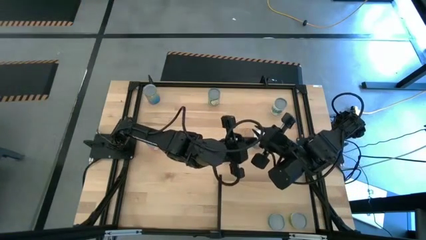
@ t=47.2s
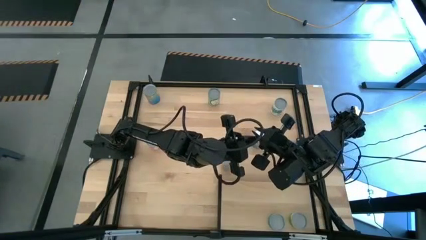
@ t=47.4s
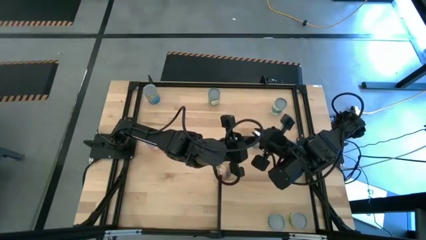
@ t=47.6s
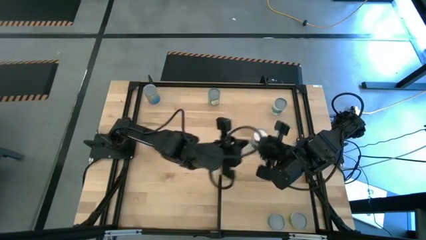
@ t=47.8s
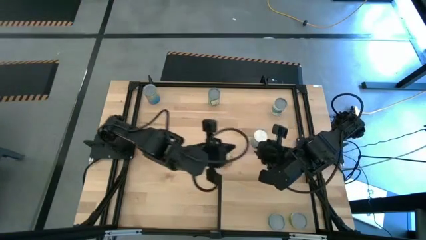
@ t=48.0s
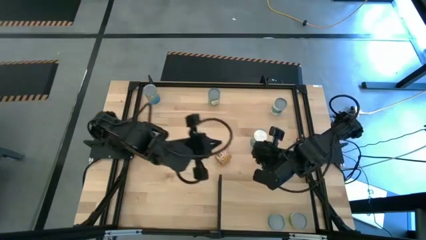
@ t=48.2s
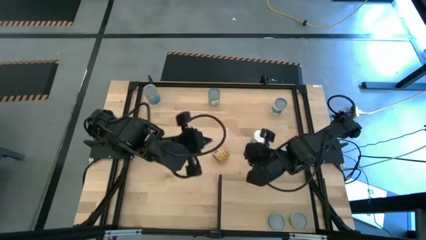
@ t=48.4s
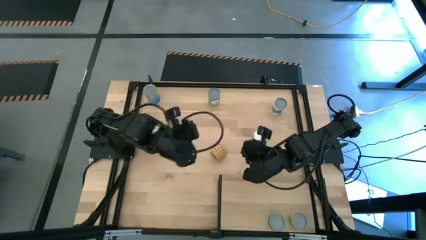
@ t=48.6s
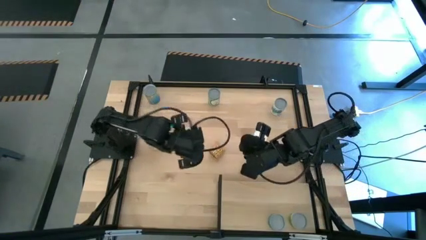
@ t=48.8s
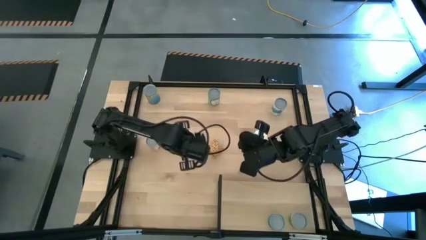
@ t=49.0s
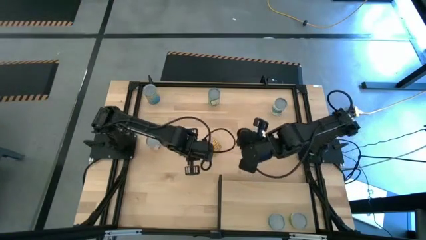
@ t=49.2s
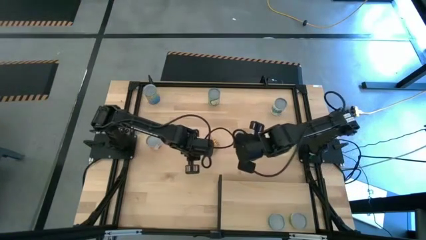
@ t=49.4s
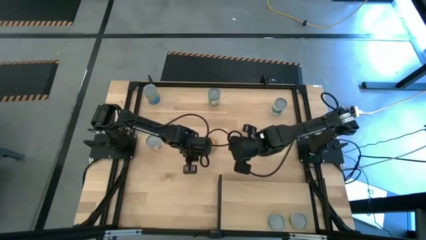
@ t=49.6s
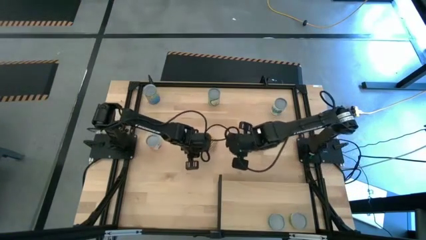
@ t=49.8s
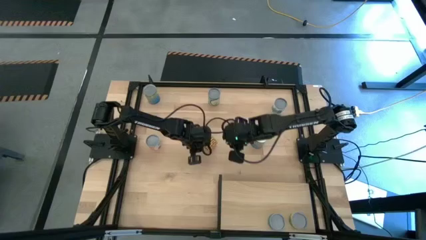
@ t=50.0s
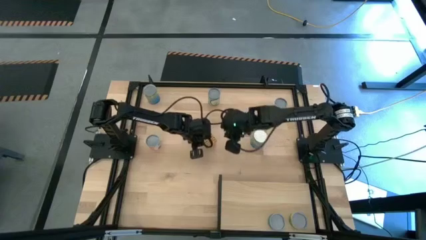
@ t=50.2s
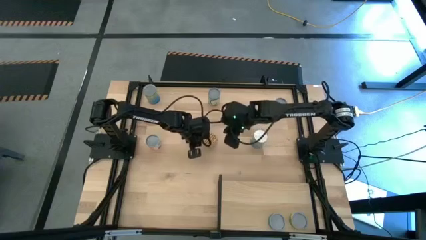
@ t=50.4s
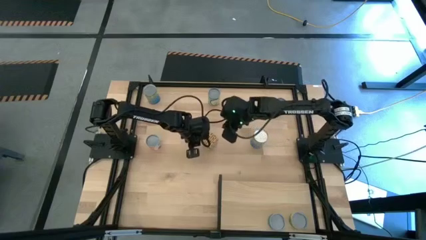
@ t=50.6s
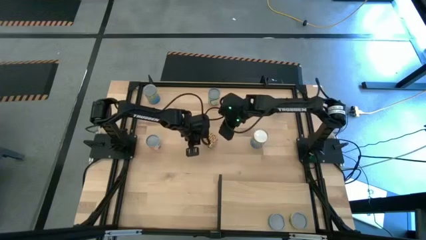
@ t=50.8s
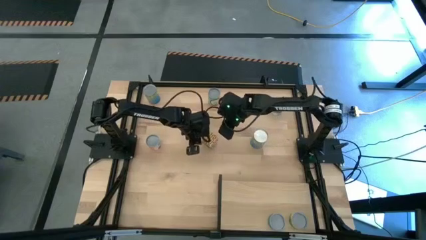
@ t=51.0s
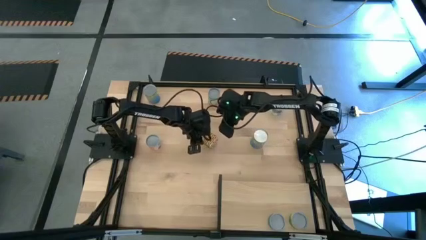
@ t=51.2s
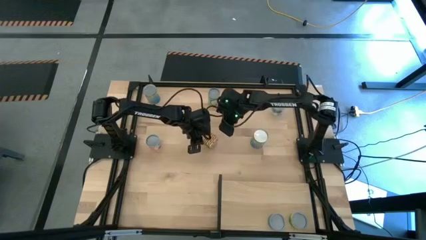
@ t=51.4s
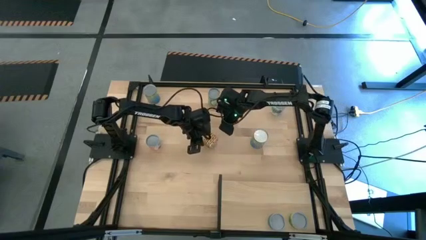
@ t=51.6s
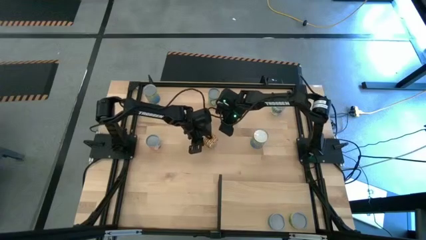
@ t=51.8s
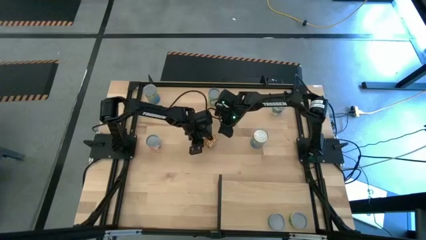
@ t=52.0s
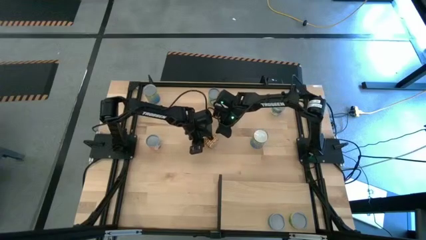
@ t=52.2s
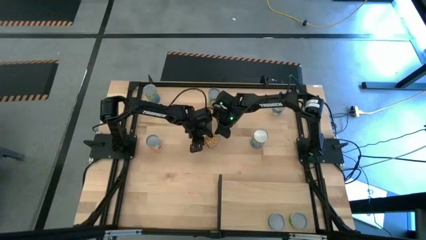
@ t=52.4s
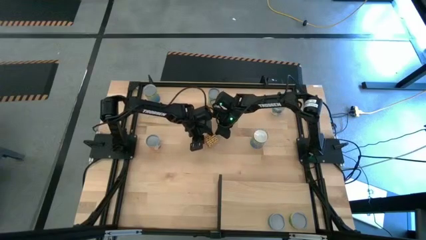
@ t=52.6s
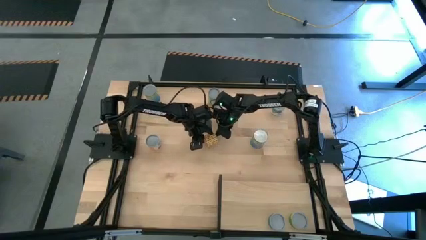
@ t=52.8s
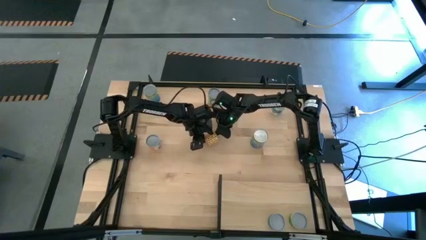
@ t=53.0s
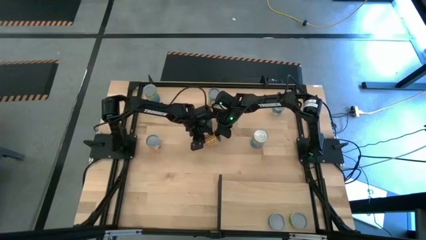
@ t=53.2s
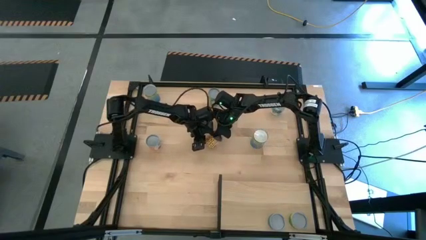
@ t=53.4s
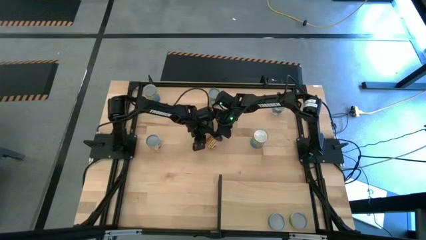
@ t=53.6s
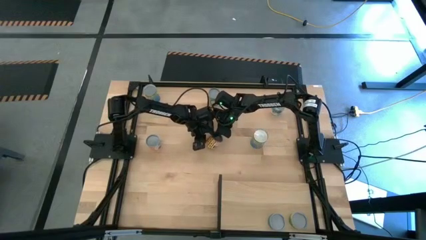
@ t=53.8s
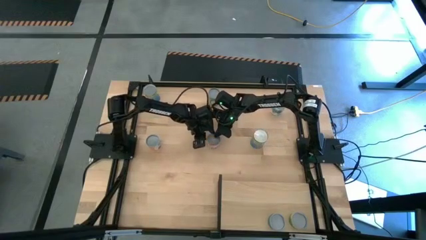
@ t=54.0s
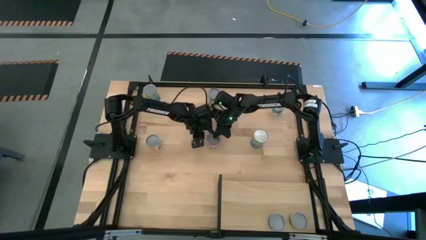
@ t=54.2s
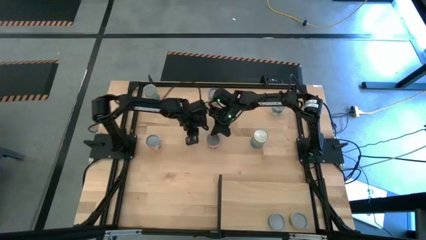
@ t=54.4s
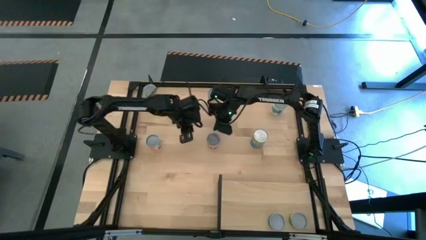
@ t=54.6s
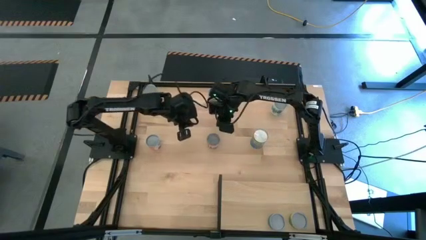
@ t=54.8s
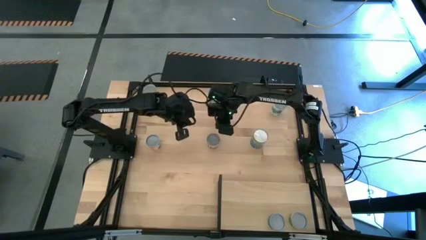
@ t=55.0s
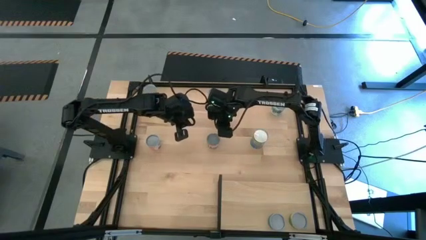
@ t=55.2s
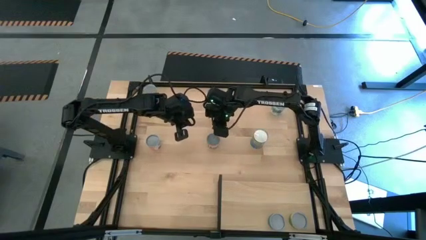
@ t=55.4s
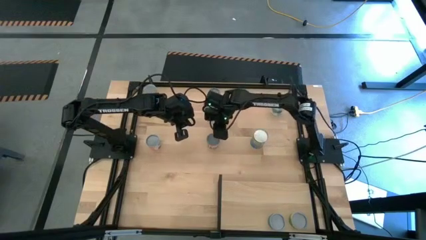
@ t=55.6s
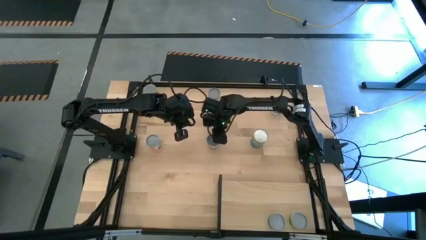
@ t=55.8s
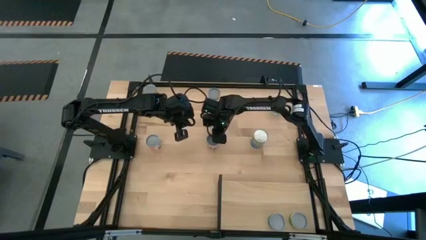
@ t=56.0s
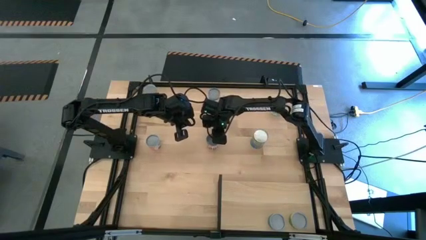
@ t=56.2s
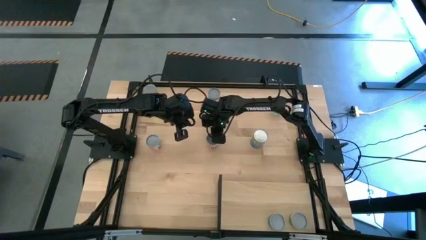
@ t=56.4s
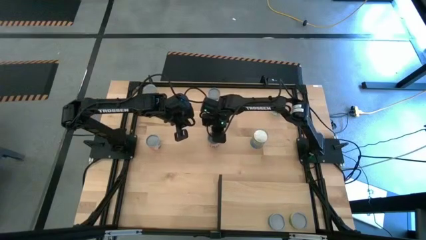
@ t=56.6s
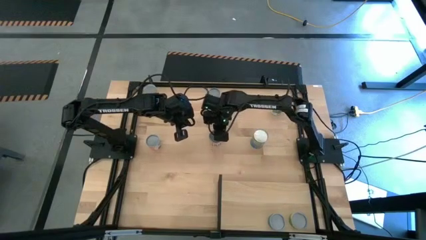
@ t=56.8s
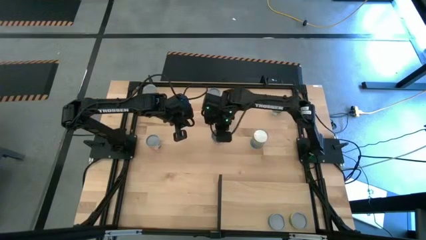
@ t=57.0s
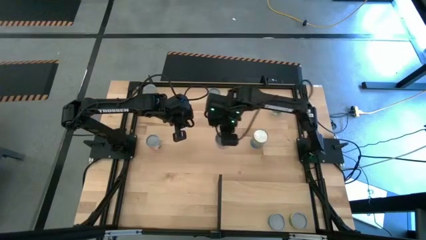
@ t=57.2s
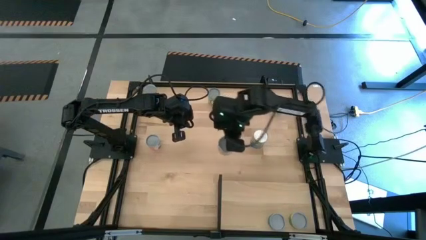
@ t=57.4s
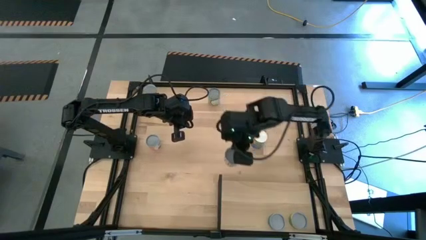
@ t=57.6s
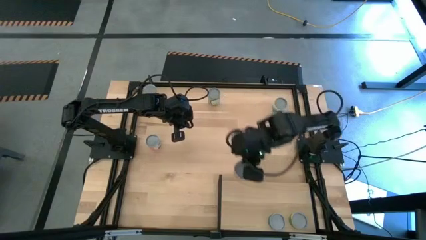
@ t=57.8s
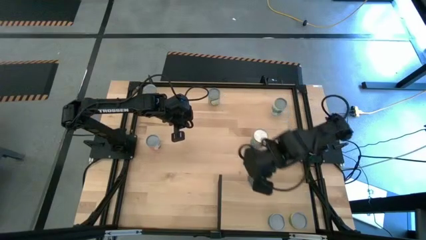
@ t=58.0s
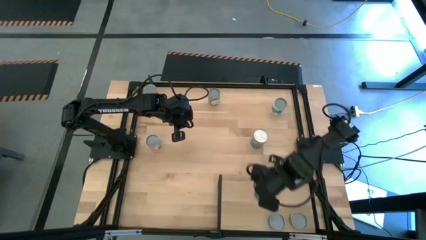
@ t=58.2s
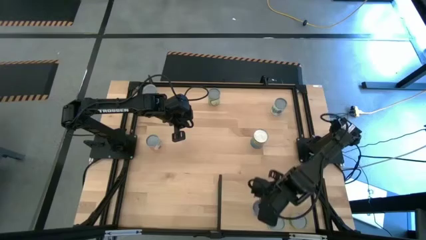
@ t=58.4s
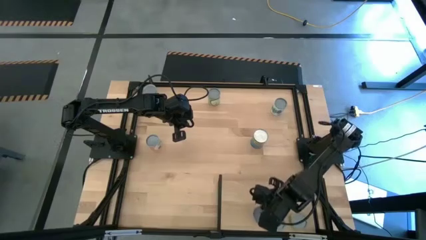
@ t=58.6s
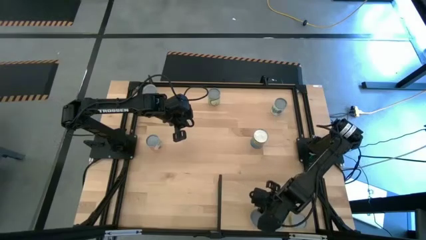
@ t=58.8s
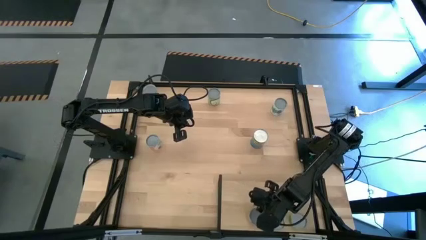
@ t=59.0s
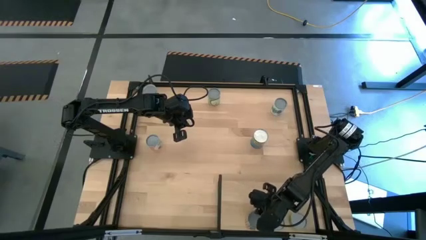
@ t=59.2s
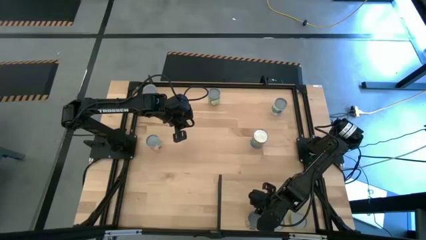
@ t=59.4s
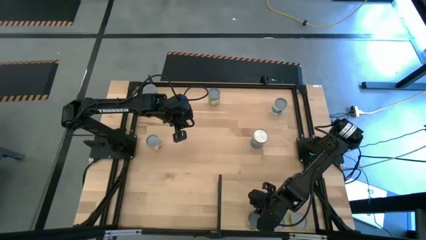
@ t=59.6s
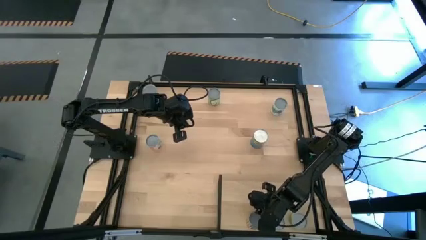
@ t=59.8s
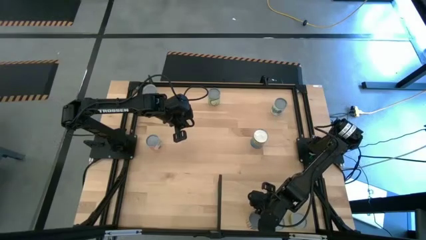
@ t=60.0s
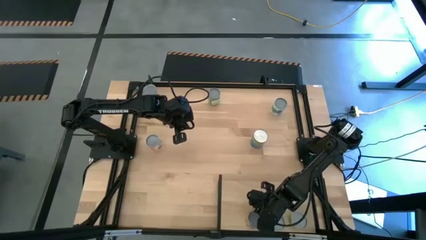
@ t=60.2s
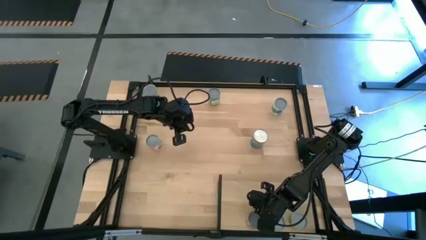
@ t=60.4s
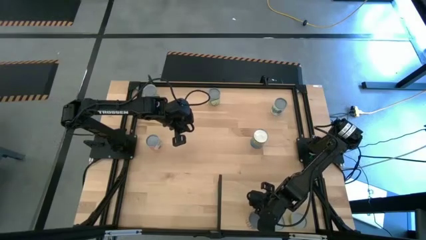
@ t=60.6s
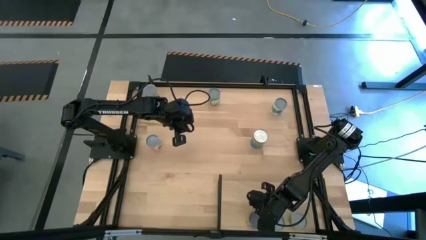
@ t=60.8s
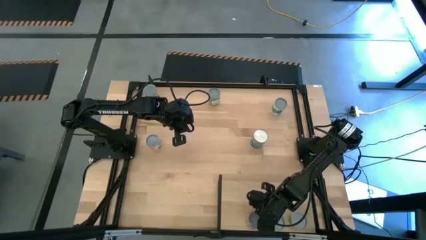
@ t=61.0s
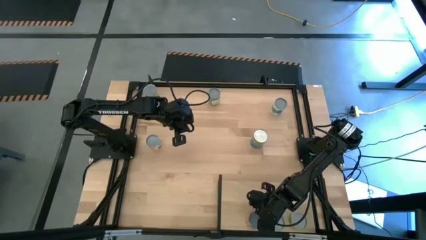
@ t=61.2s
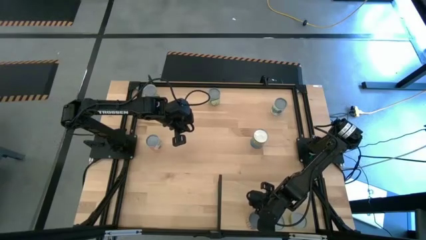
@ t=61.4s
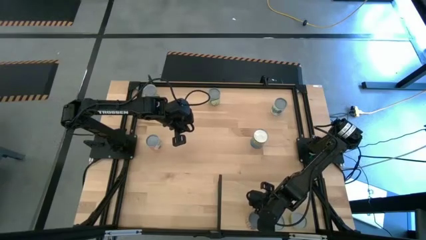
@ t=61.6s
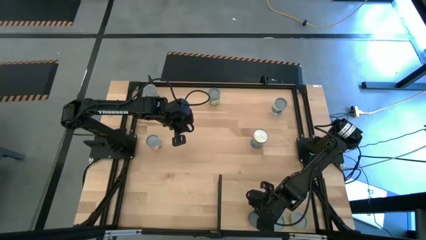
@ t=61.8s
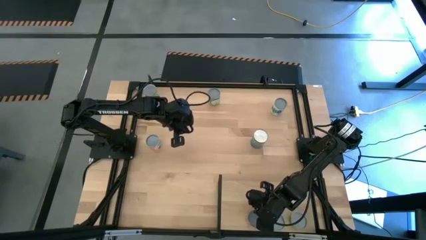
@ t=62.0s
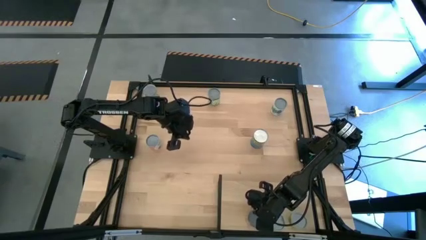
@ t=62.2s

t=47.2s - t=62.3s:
Task: Pick and place cans onto a shelf
Put the canned black beans on the shelf
